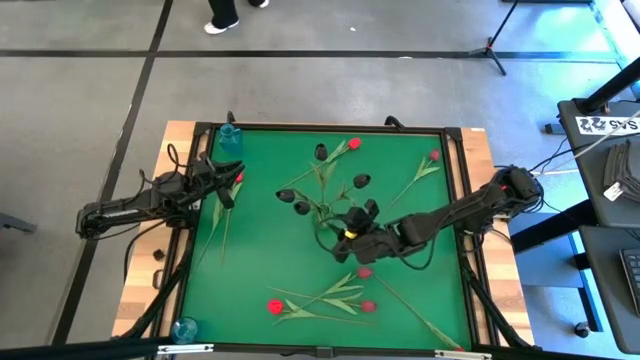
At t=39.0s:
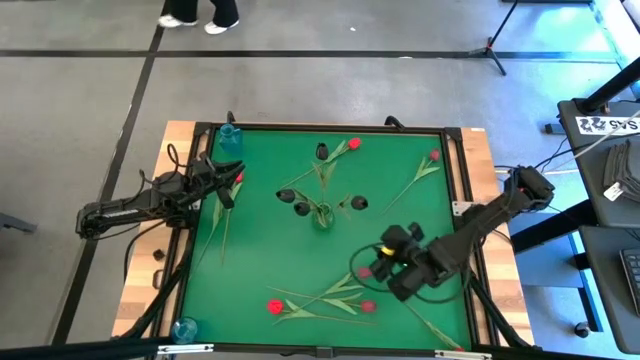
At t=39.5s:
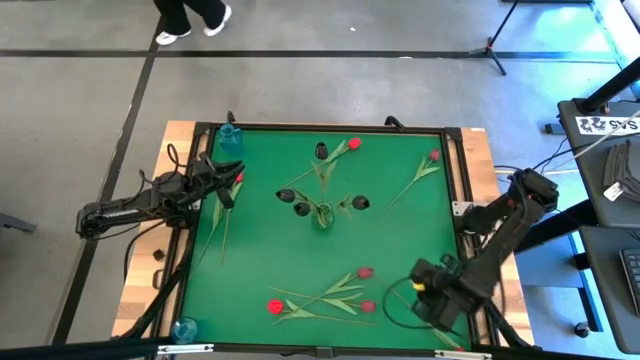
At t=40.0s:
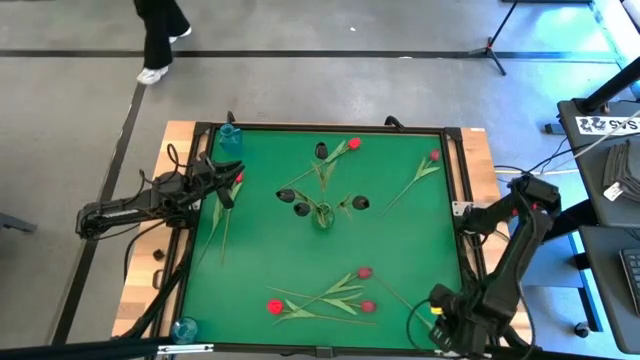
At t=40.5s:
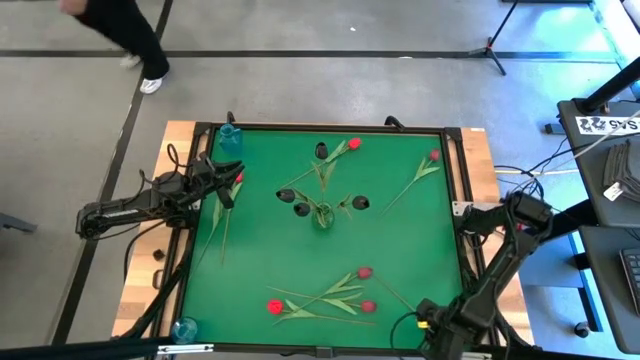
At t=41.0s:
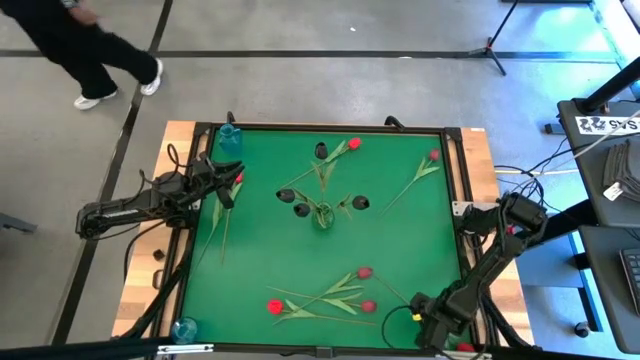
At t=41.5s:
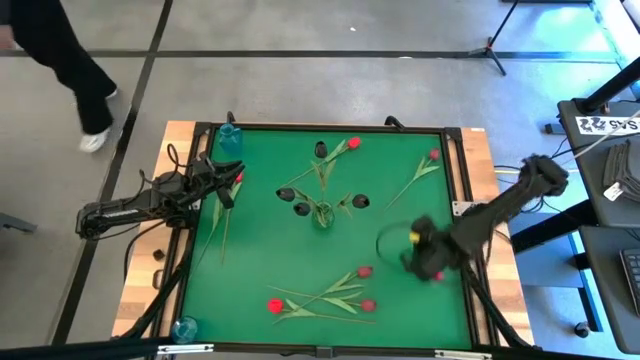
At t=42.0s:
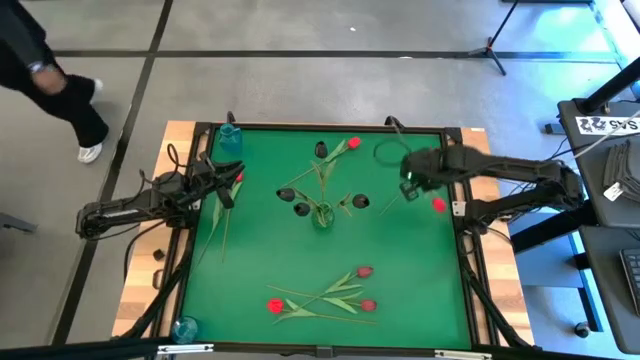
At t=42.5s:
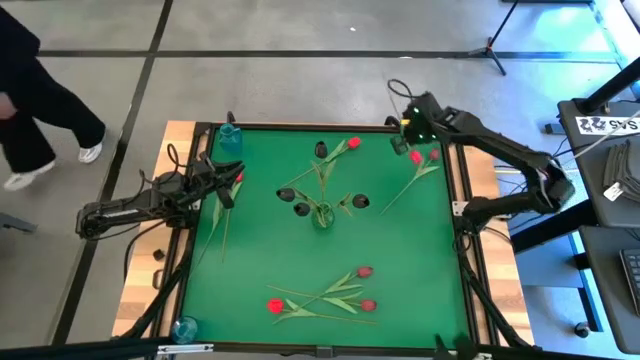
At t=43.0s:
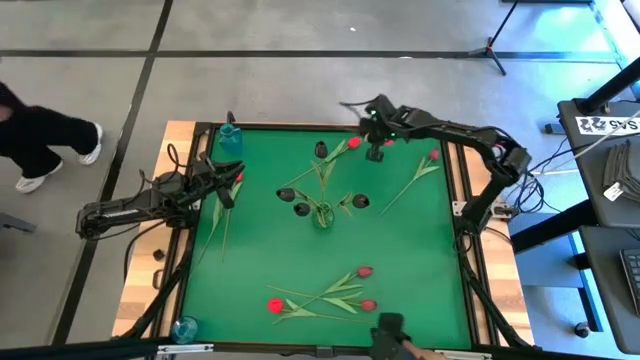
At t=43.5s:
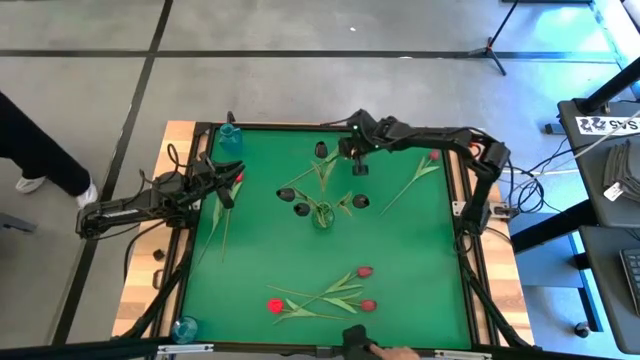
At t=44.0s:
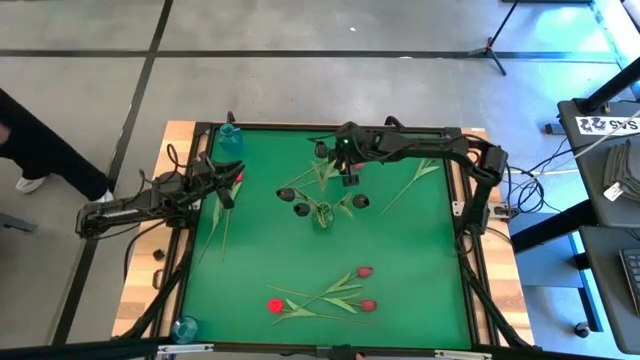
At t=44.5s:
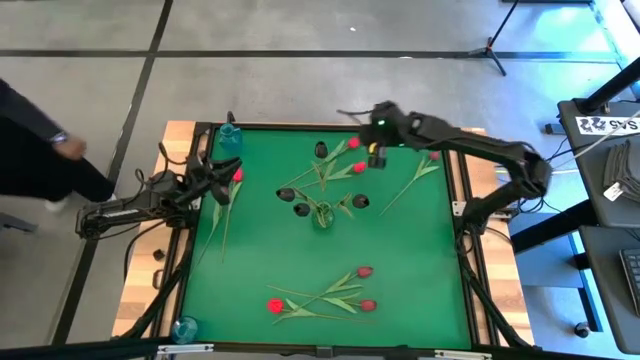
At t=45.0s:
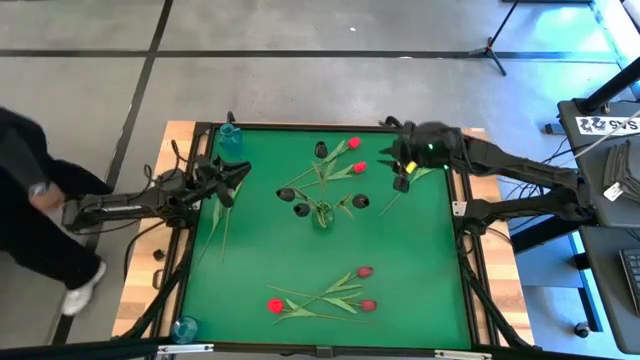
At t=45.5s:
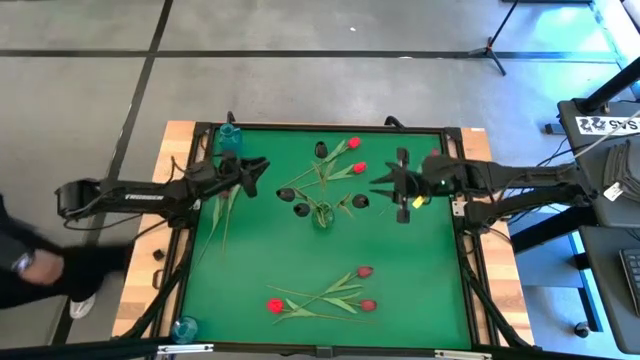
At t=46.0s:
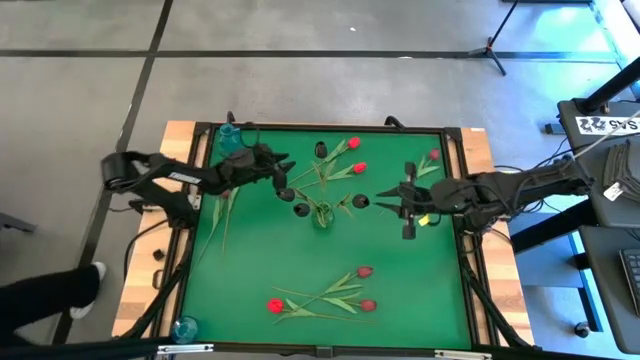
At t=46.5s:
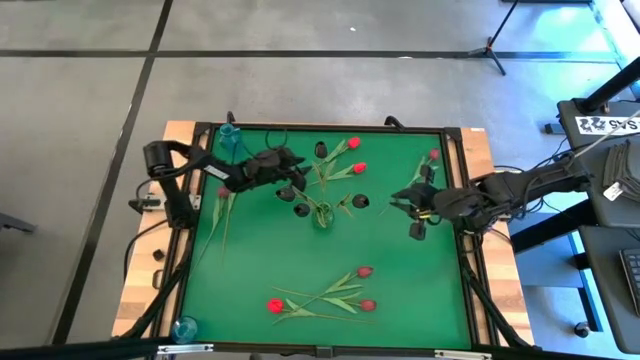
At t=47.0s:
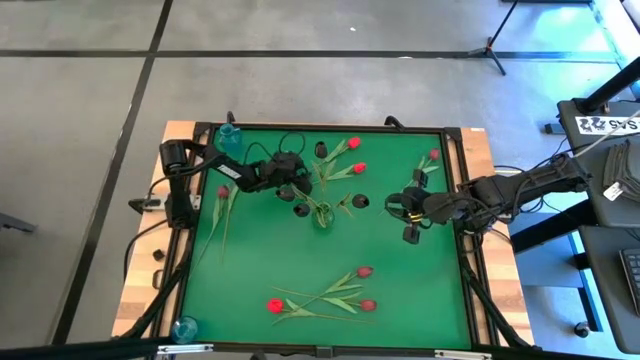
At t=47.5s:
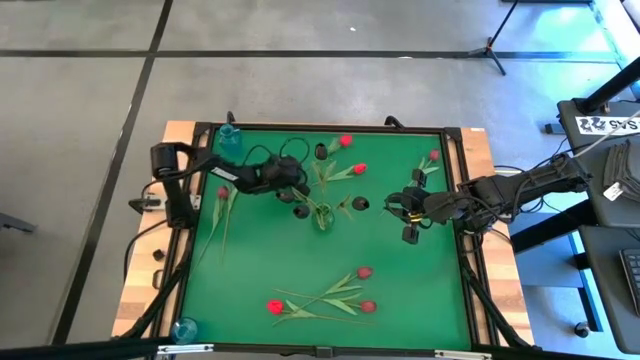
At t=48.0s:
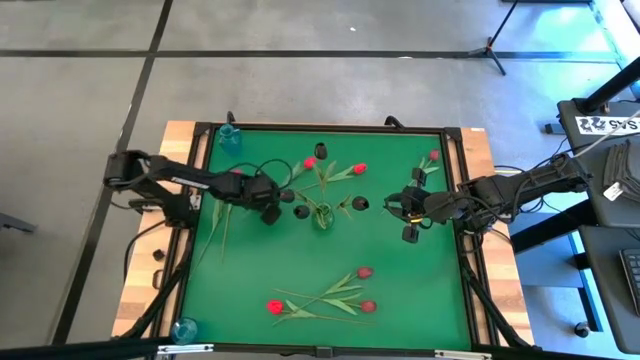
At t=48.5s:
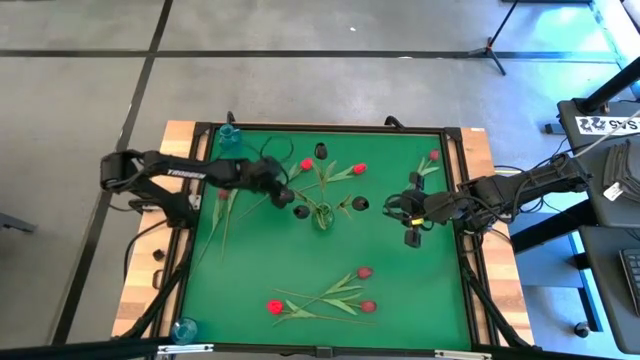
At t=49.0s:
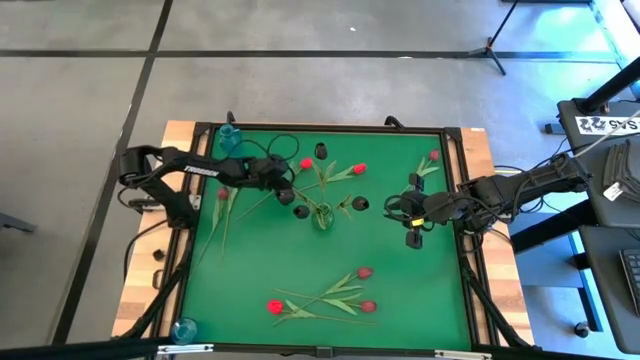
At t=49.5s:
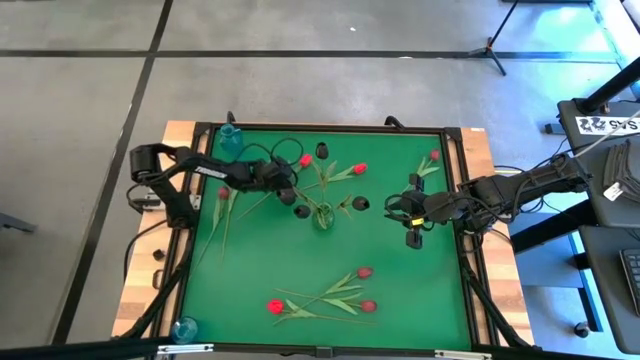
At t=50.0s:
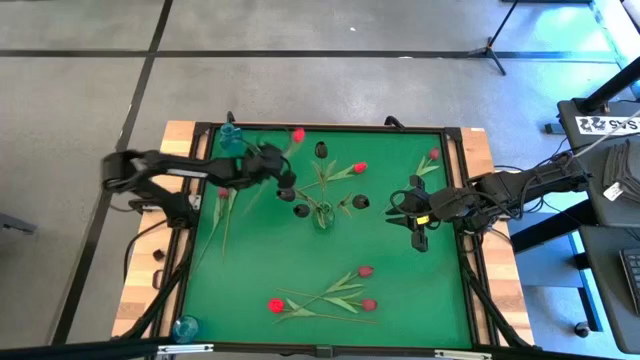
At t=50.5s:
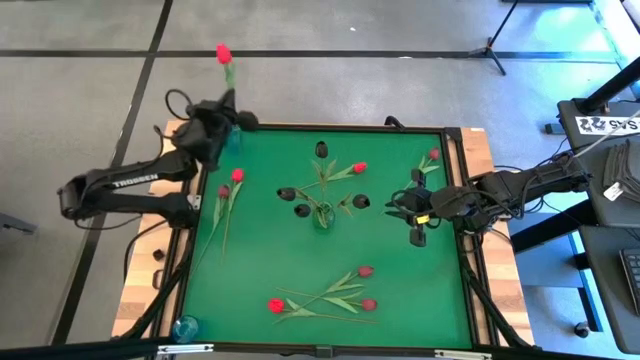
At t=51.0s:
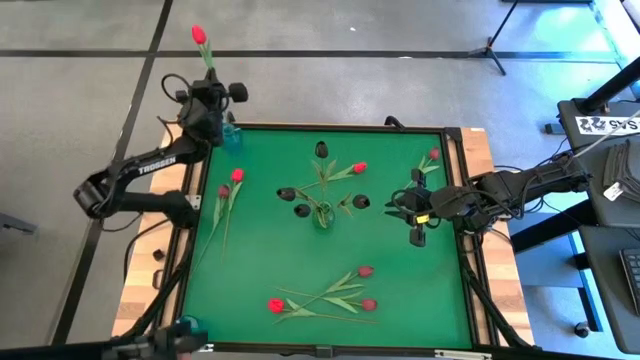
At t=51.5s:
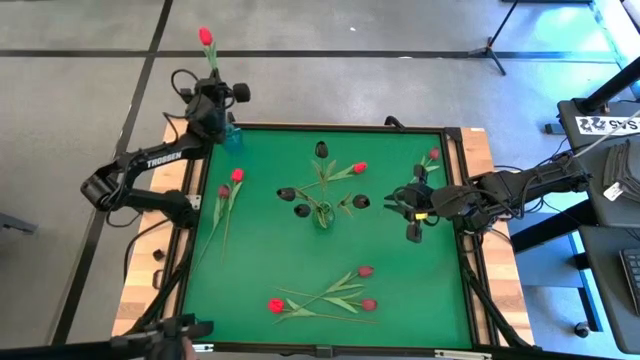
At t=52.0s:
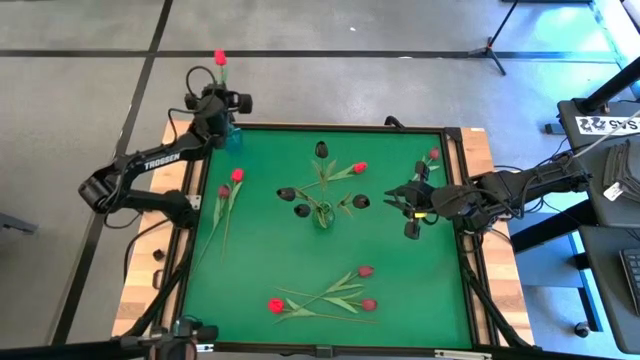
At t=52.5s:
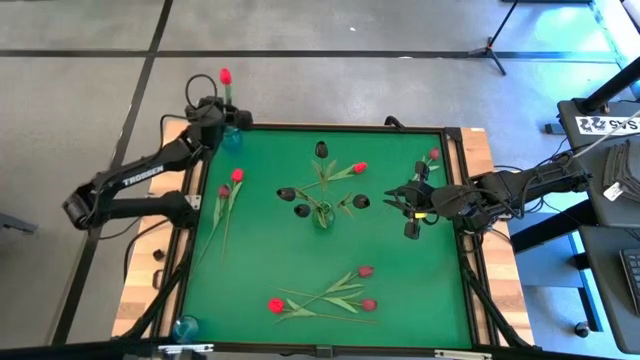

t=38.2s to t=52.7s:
Task: Sort flowers into vase by color
Put the red tulip into the top blue vase

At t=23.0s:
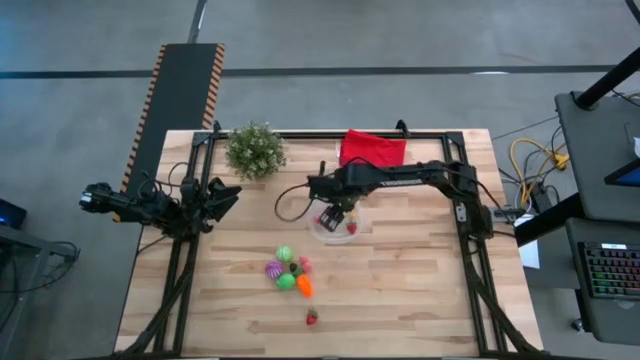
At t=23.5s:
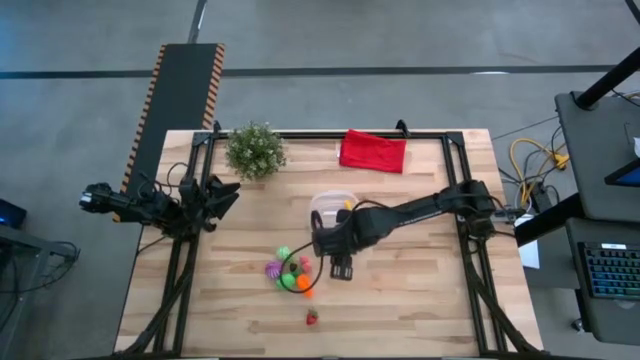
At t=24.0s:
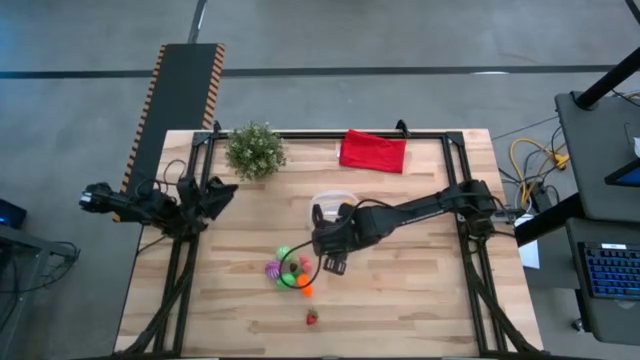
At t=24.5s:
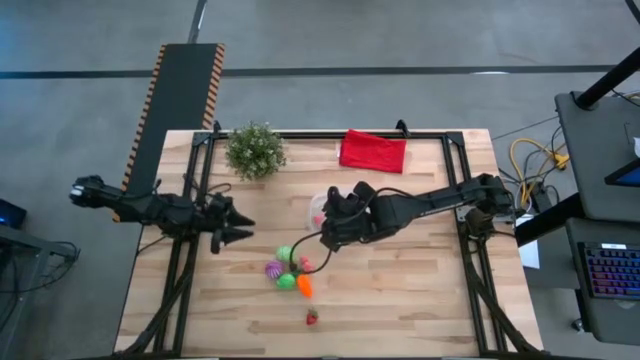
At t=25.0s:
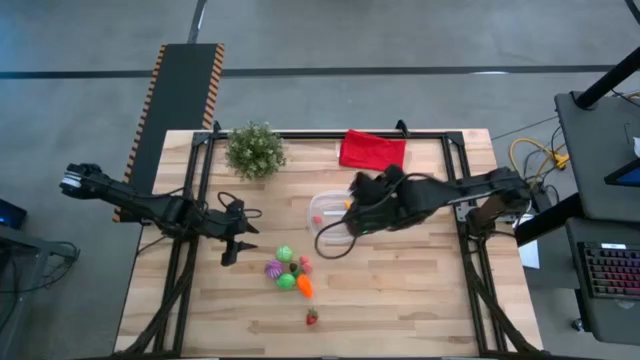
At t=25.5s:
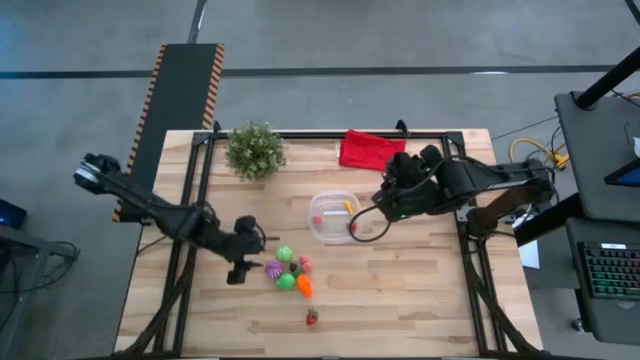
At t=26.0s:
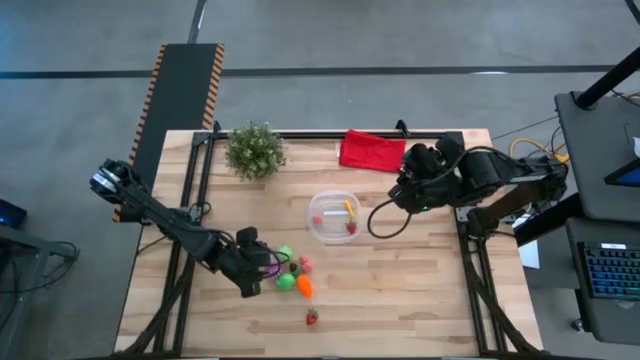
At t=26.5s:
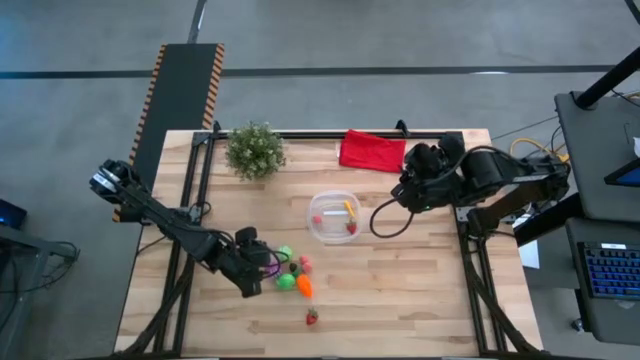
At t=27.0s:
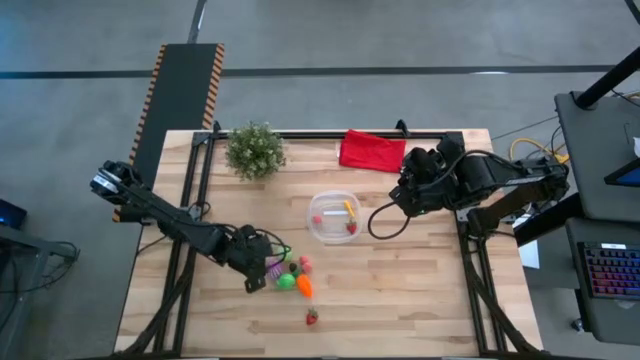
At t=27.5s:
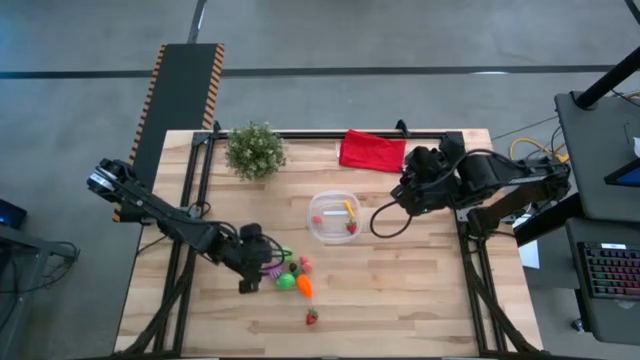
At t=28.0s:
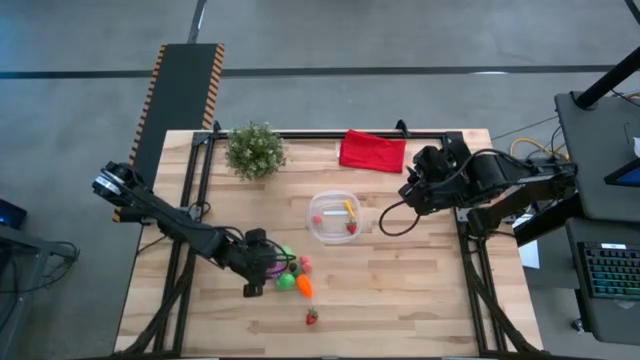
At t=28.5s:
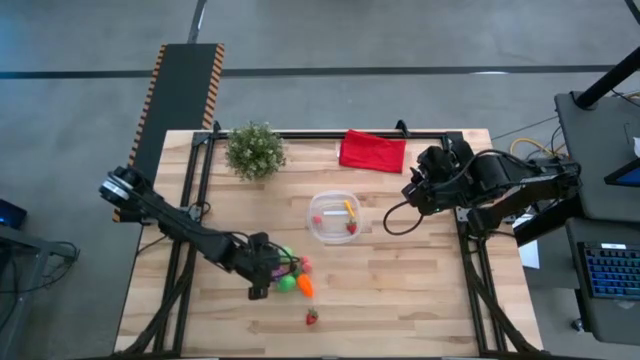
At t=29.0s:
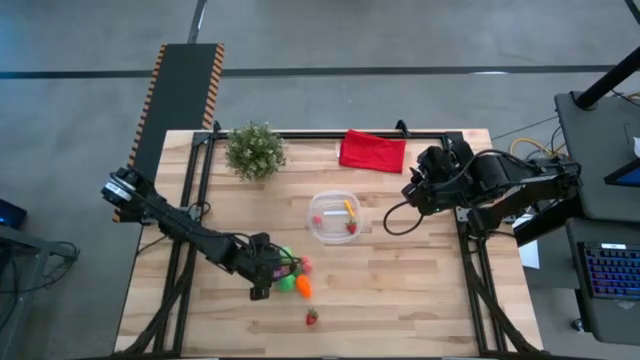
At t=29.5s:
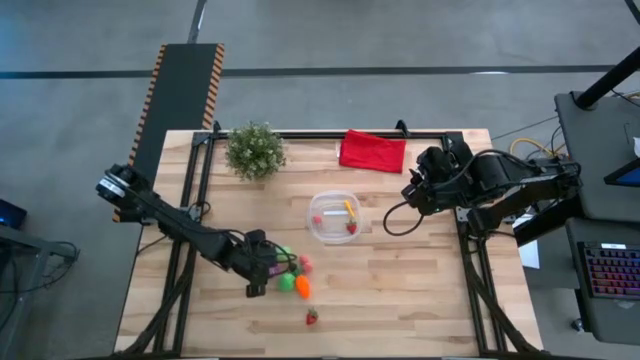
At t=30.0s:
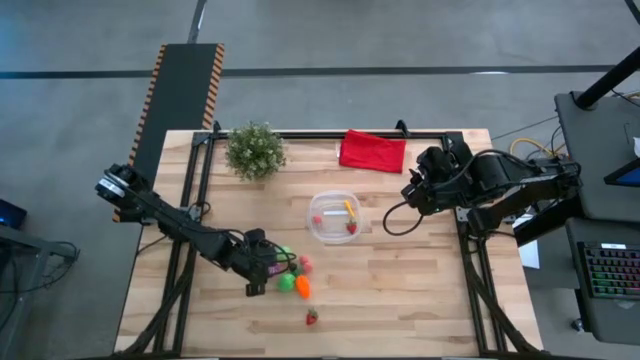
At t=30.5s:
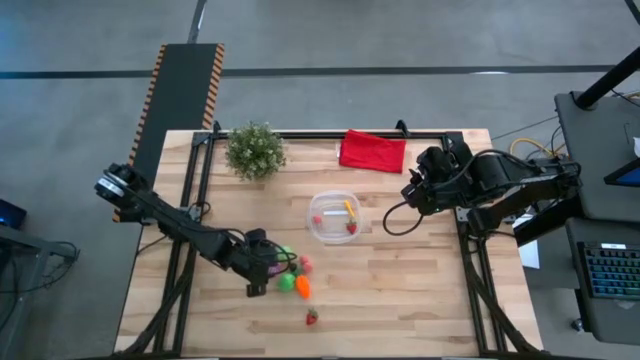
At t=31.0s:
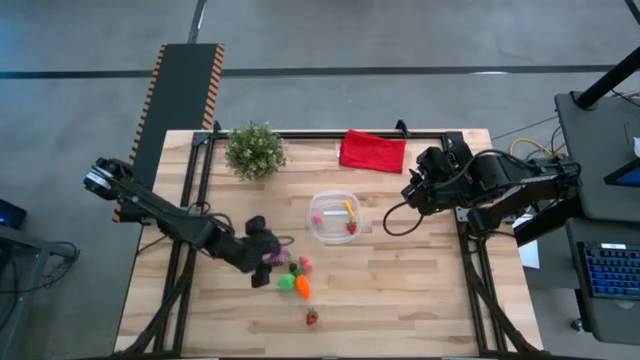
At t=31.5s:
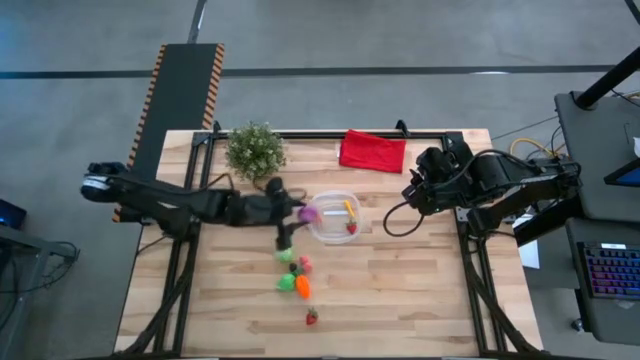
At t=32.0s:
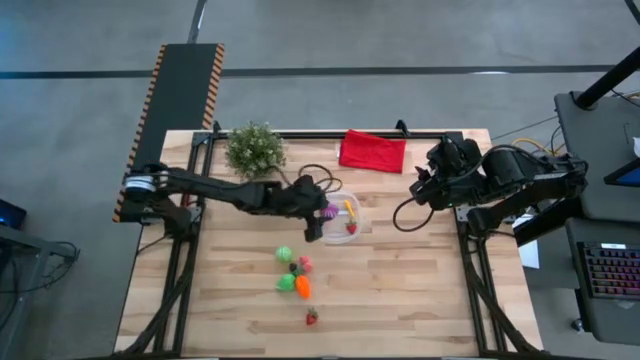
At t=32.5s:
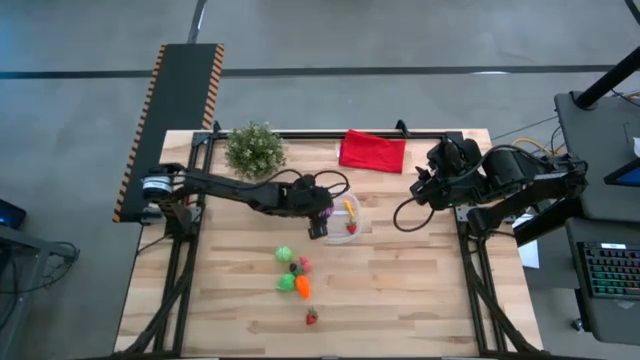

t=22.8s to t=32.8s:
Task: Pick and placing Produce into tupperware
Put the purple onion into the transparent container
